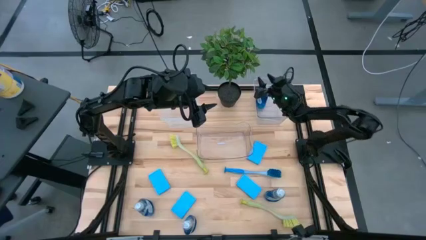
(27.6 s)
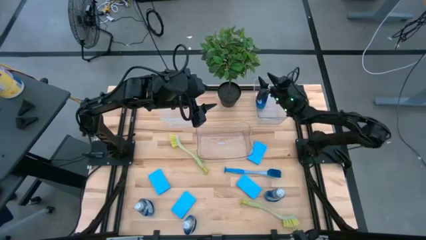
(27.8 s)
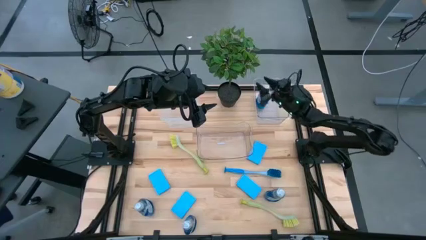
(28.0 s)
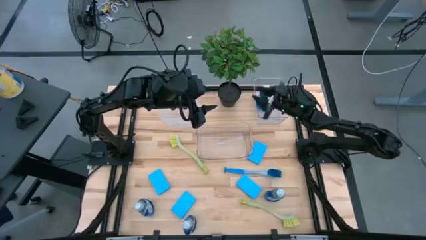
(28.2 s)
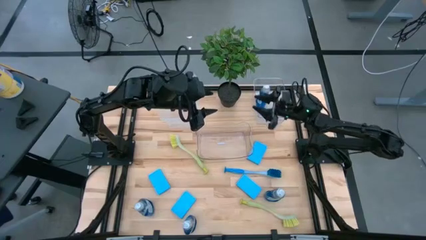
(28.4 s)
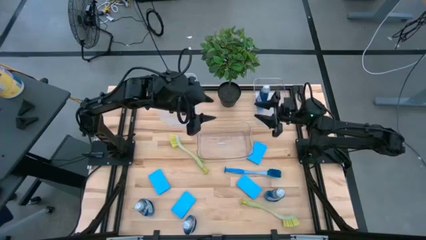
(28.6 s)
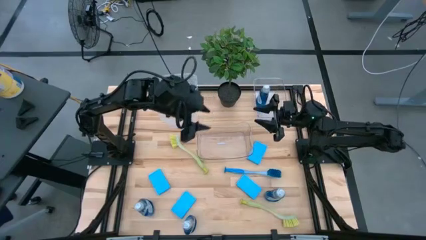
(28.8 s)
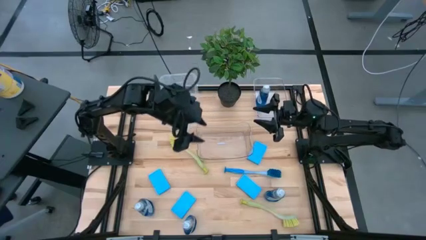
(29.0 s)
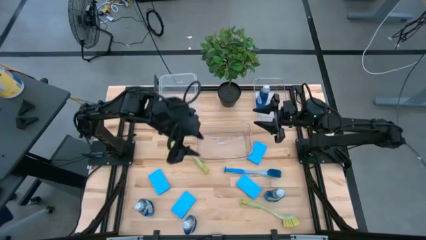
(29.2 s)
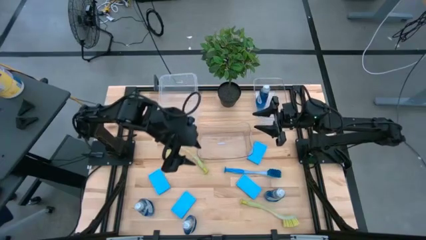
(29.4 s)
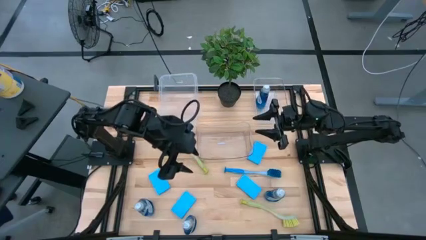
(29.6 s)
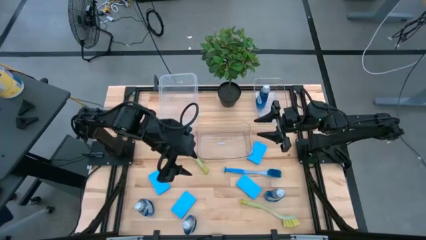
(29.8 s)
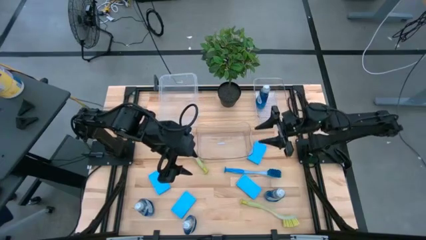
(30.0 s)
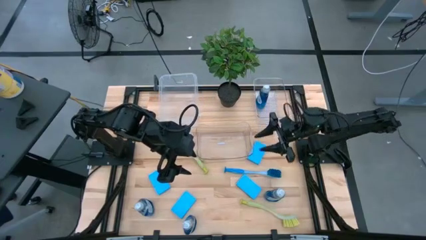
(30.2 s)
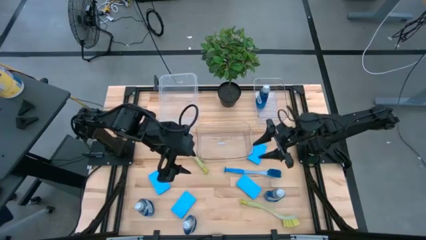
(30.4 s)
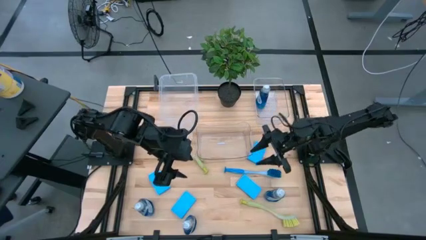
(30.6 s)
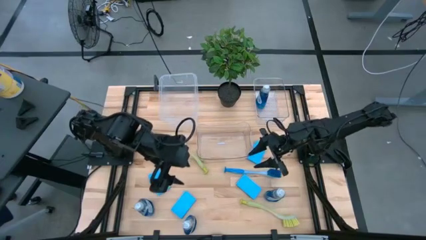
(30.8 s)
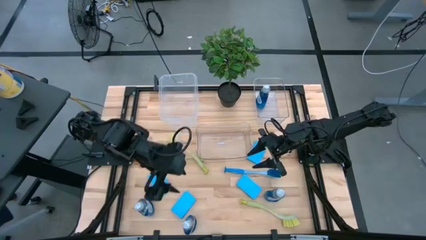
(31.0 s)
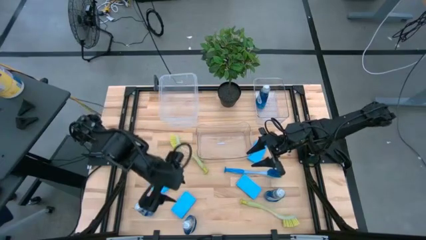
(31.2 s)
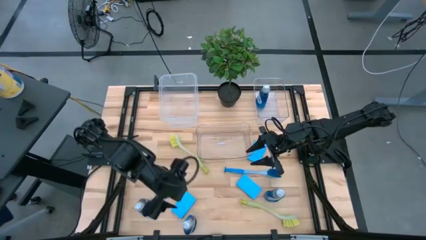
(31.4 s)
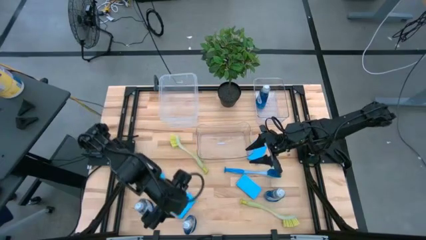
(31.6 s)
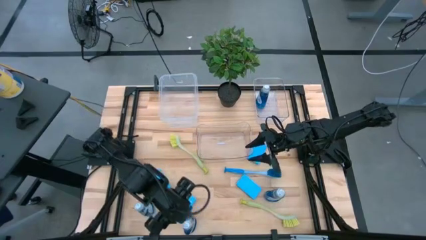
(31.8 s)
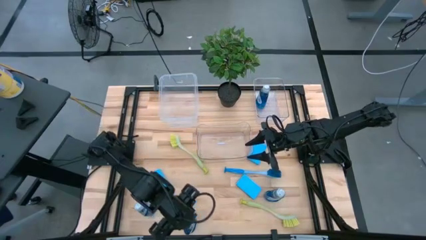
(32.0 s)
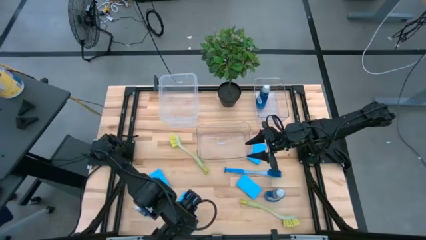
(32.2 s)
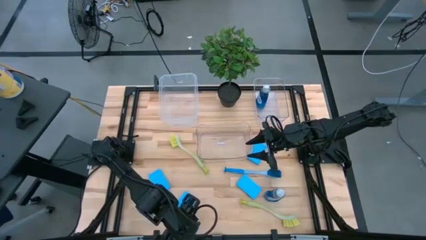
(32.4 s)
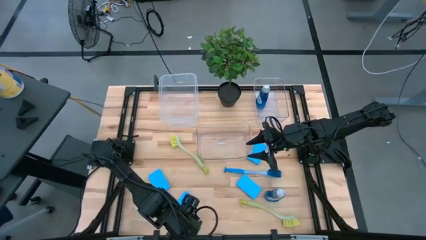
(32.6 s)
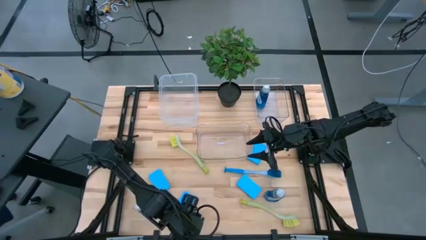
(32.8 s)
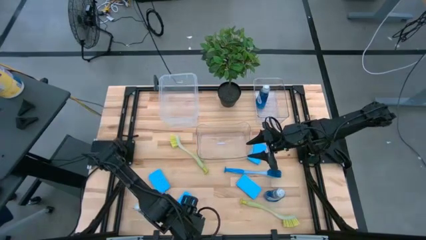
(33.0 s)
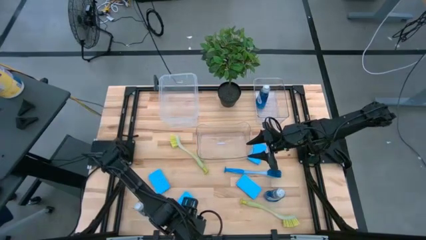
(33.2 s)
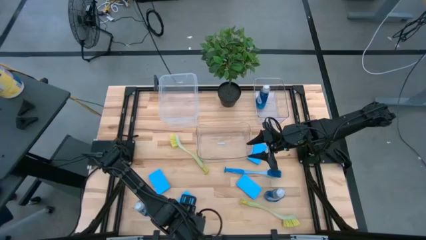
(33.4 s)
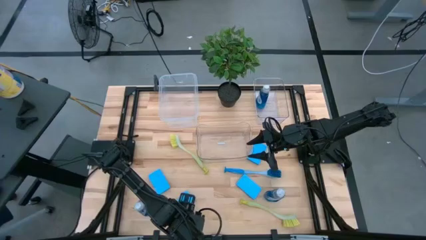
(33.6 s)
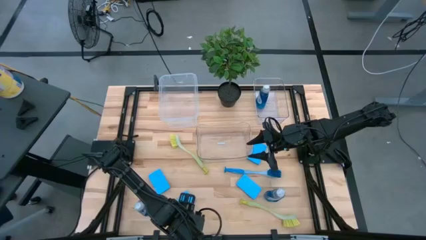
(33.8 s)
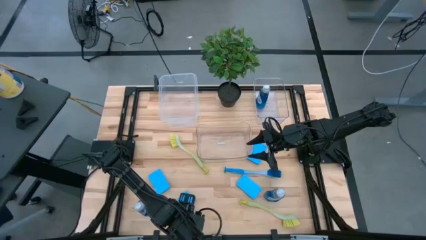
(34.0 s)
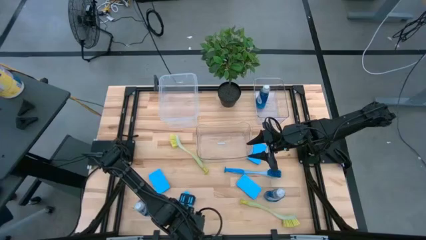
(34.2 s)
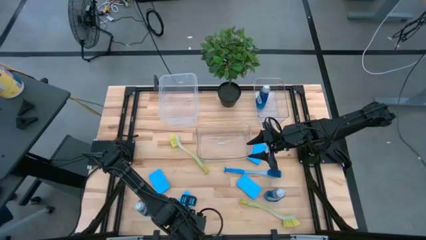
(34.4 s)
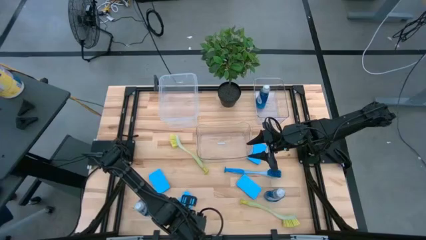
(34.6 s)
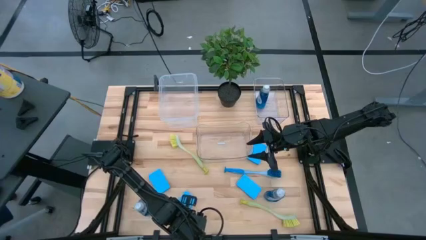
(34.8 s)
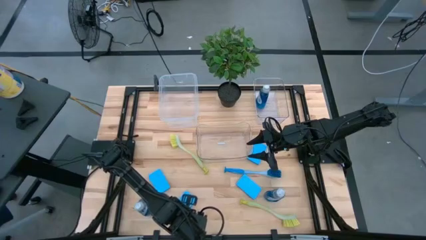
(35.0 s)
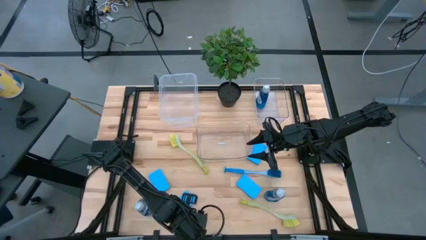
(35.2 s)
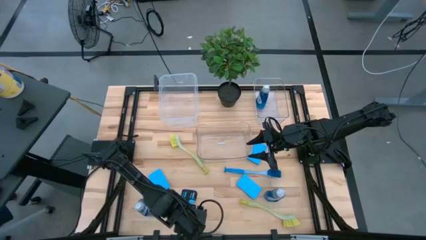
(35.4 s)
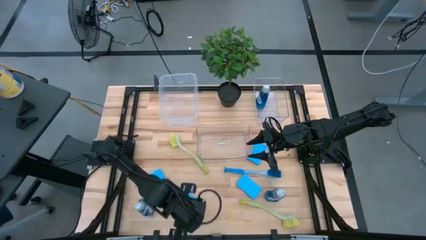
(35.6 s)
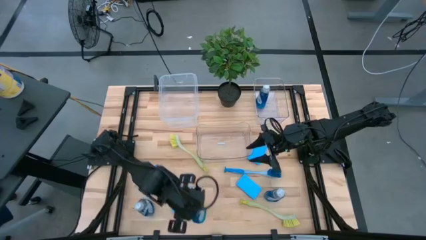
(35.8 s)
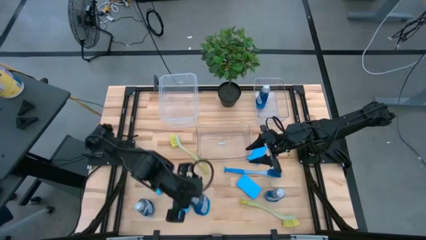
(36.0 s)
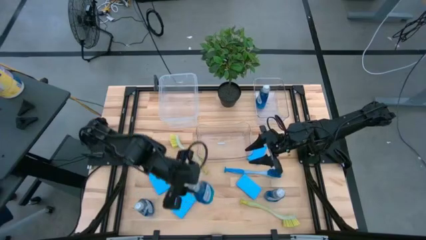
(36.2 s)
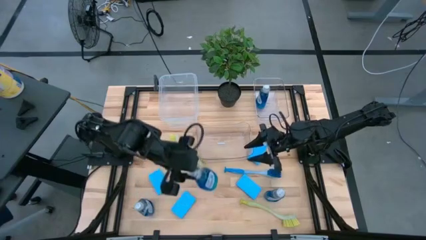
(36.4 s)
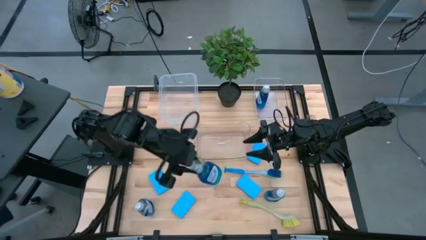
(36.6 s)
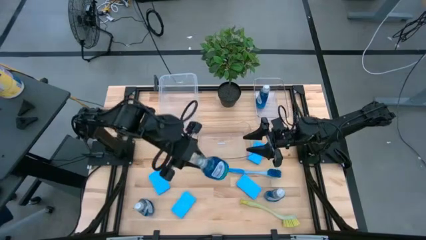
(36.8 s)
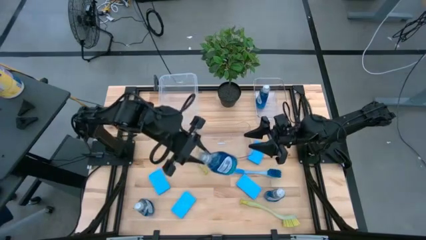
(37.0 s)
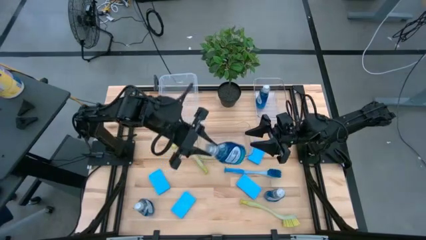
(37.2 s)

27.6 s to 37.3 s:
Task: Pick & Place Kitchen Sink Supplies
Put the dish soap into the top transparent bin

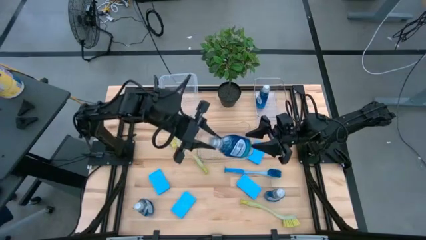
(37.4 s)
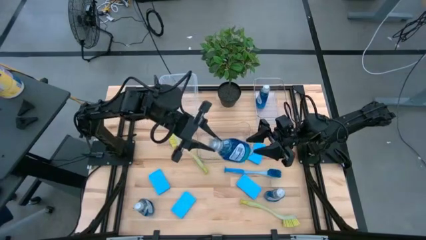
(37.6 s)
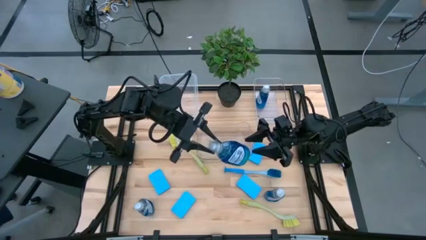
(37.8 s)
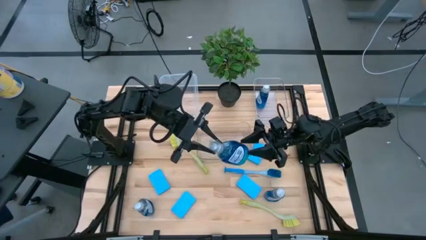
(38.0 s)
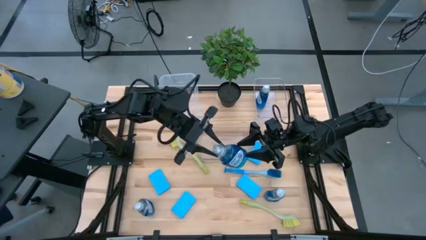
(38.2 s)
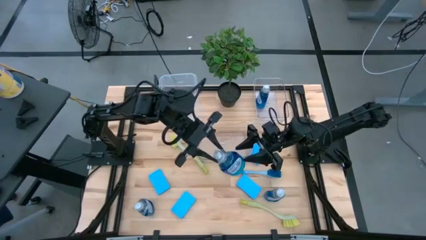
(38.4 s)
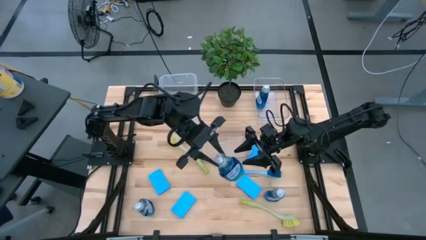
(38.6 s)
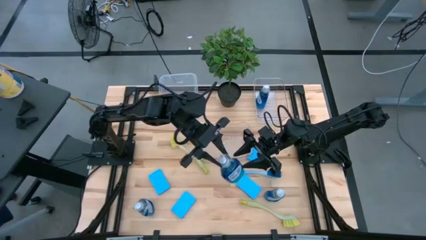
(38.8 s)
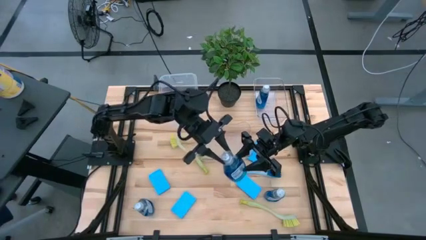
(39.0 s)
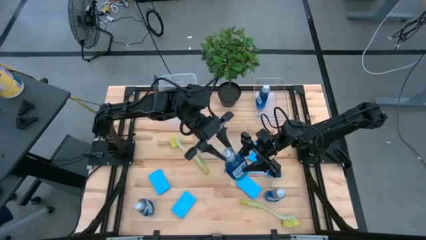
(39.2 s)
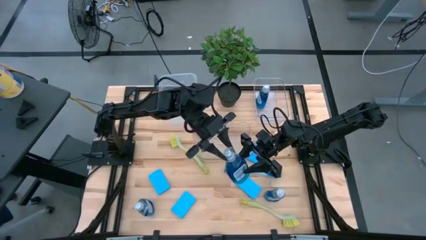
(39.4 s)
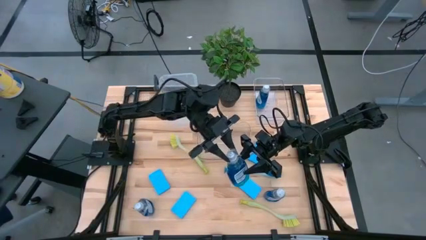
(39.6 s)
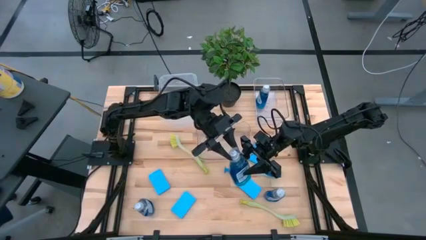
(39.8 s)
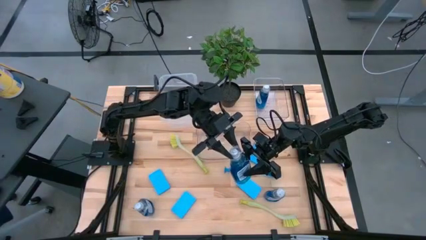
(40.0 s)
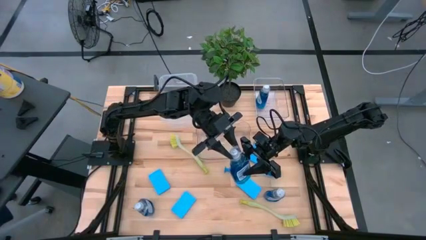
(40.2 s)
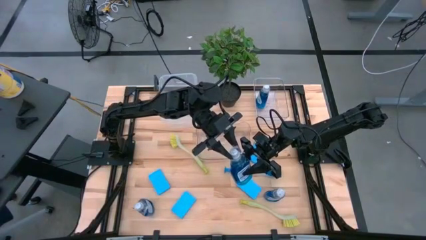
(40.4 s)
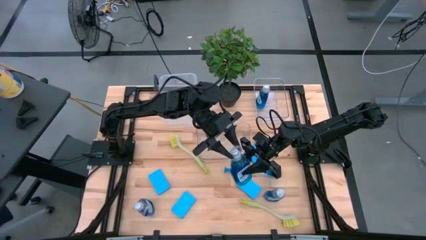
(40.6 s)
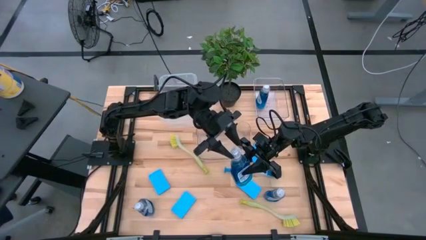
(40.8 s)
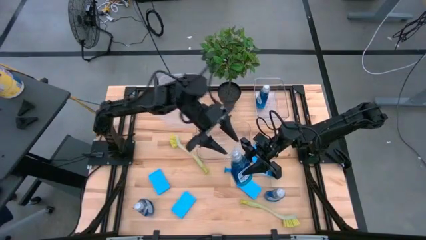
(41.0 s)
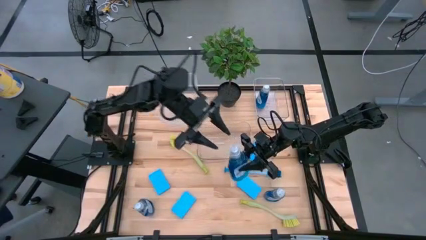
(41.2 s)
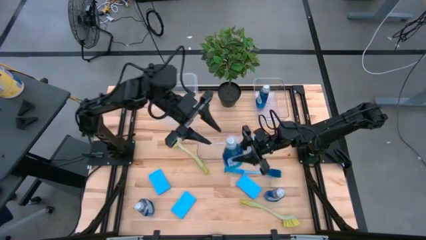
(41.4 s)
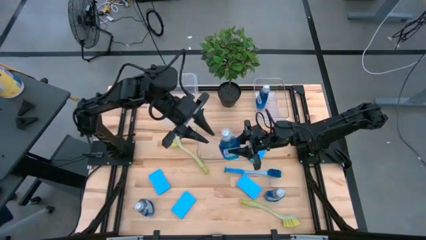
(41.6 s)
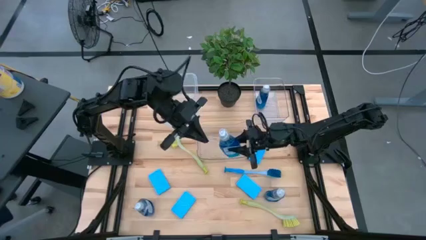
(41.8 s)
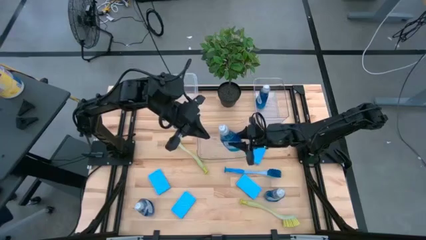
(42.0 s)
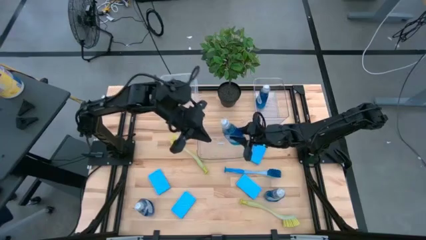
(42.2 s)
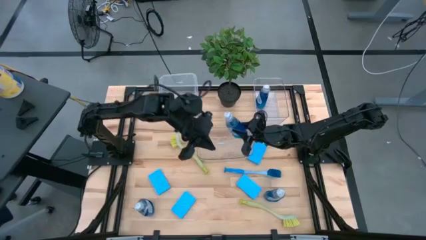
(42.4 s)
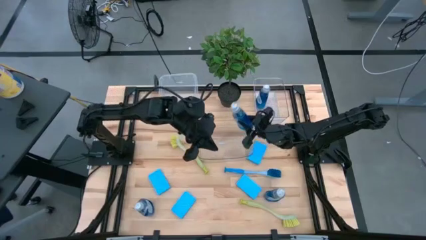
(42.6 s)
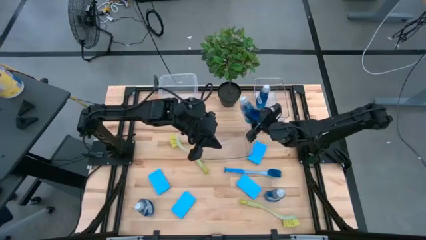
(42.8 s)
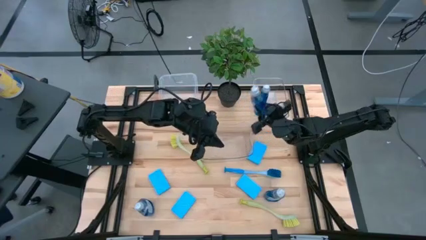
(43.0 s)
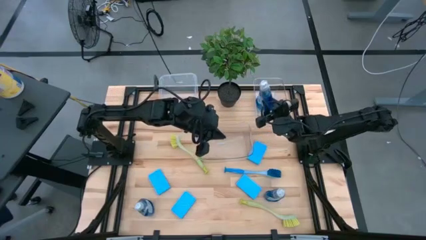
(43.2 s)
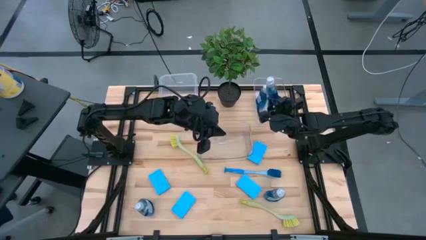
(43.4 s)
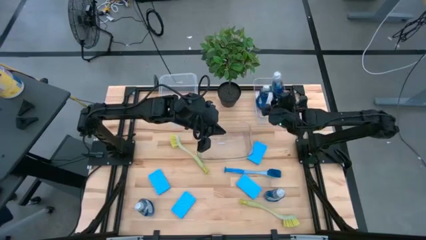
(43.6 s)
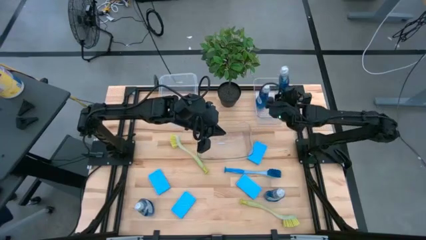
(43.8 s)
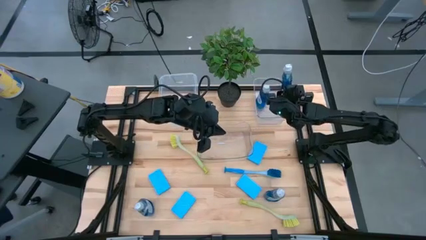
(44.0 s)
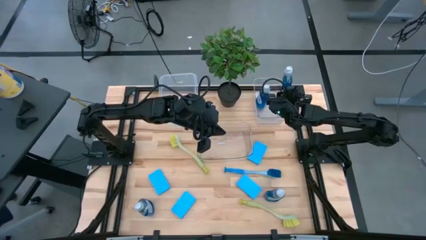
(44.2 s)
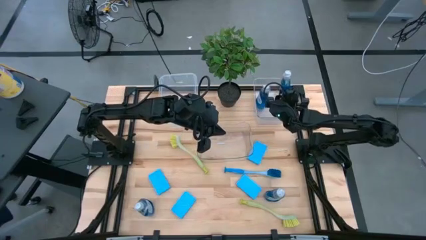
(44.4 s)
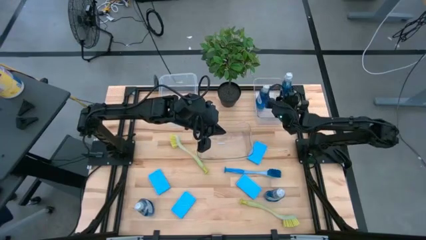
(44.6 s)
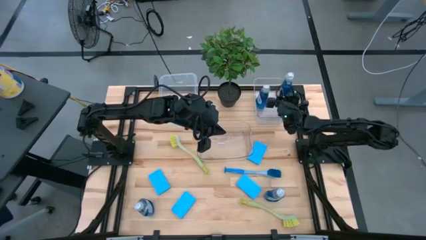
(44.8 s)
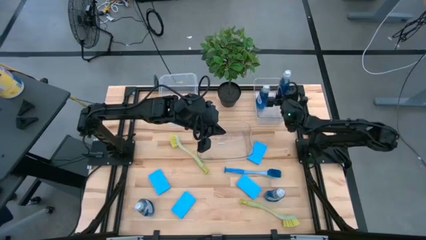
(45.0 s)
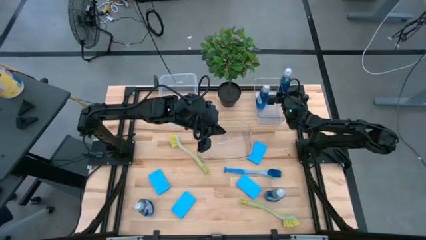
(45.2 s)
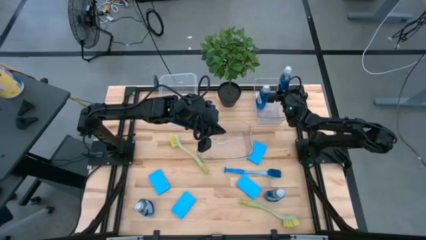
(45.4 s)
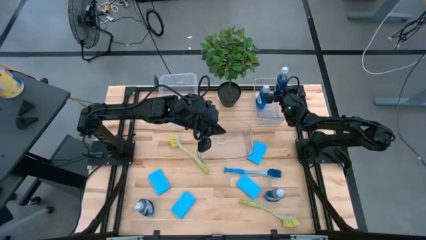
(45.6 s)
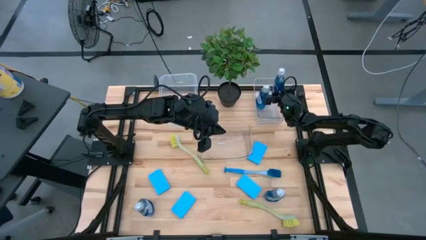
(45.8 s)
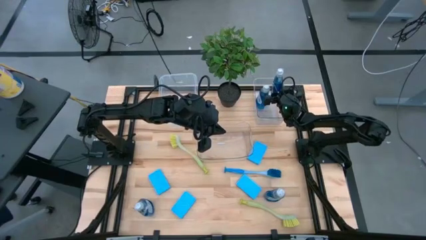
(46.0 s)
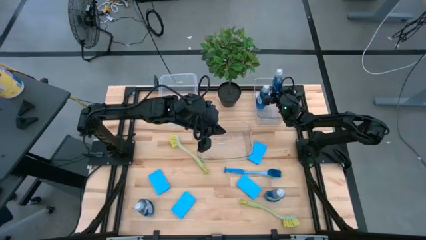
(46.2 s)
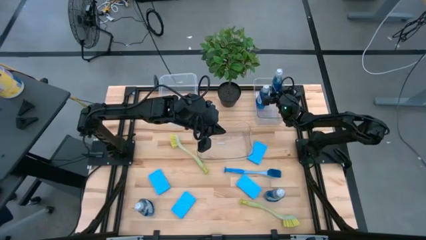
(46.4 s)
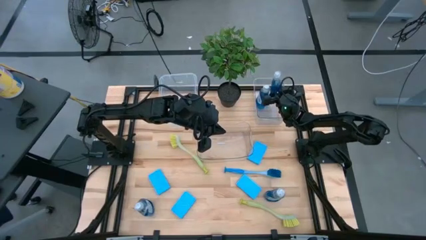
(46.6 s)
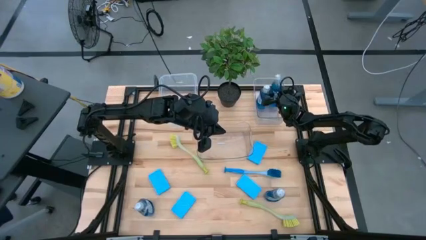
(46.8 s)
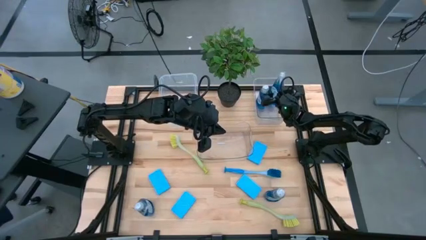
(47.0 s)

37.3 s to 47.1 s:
Put the dish soap into the top transparent bin
